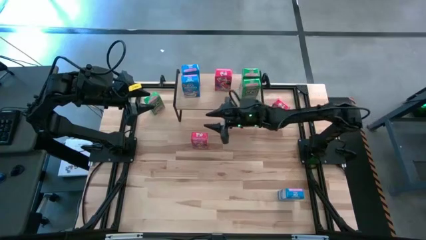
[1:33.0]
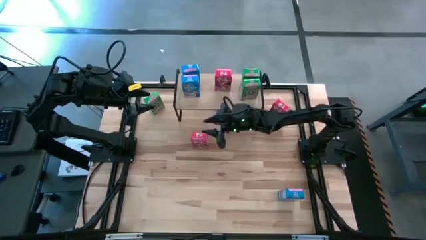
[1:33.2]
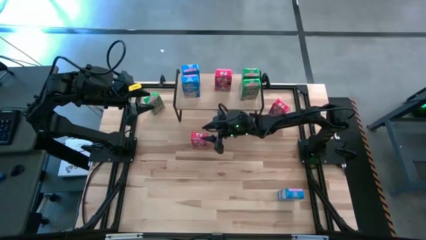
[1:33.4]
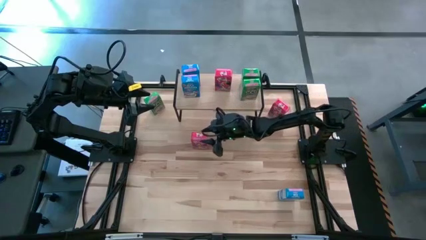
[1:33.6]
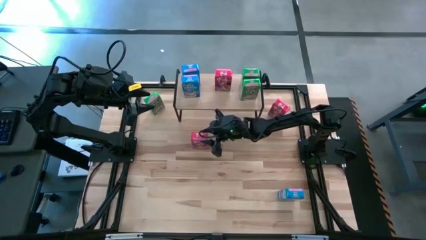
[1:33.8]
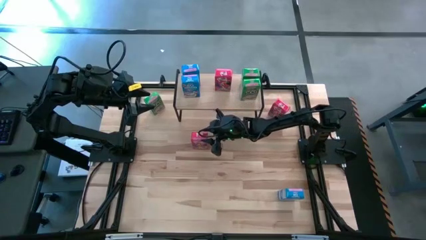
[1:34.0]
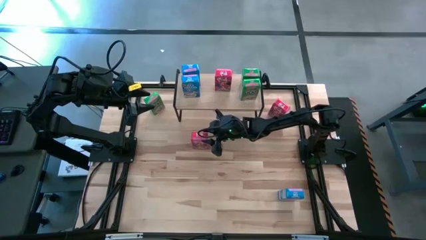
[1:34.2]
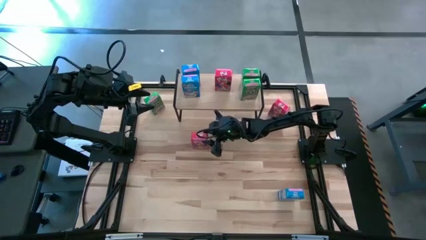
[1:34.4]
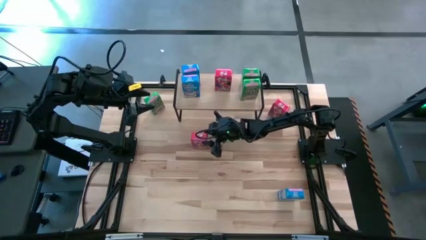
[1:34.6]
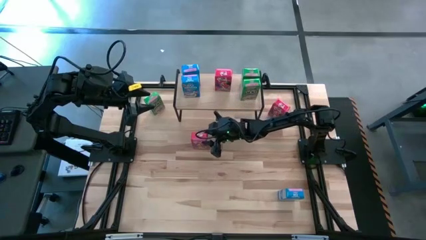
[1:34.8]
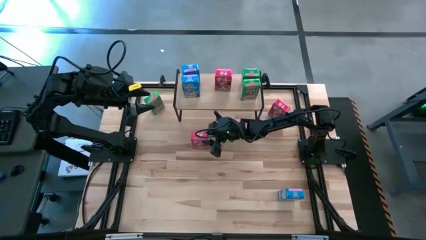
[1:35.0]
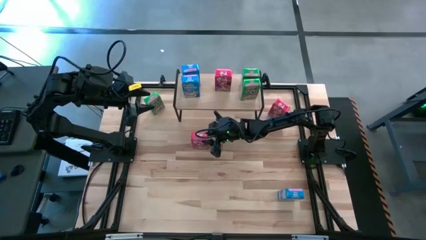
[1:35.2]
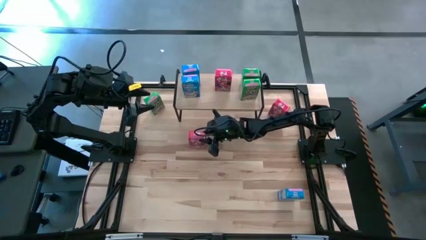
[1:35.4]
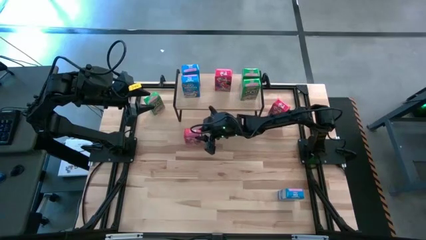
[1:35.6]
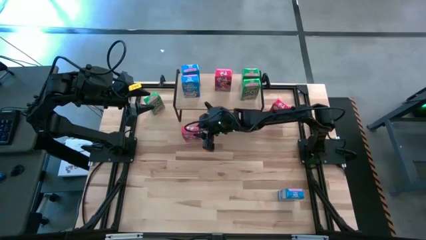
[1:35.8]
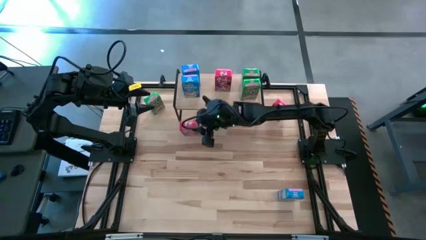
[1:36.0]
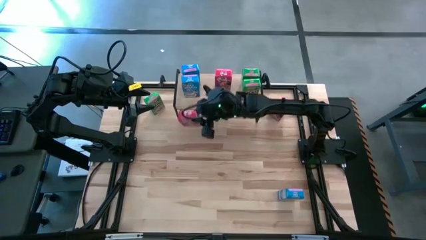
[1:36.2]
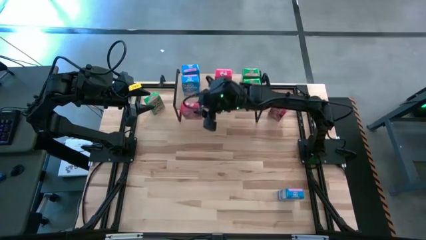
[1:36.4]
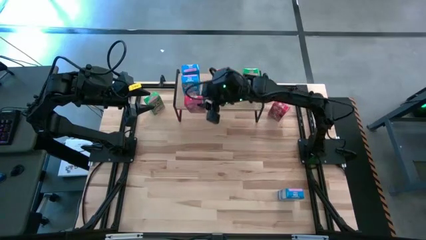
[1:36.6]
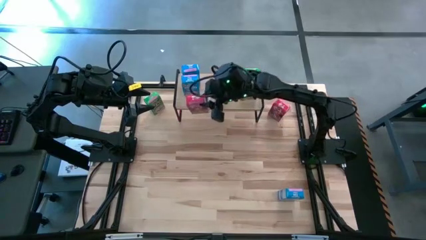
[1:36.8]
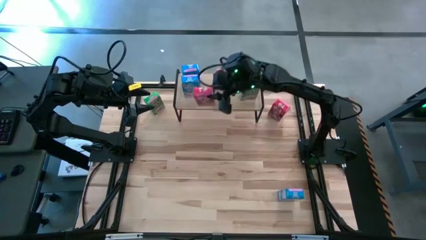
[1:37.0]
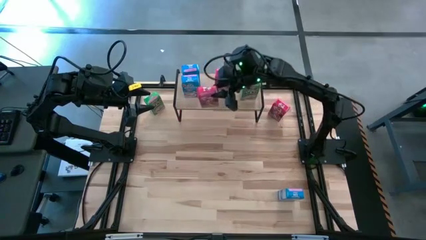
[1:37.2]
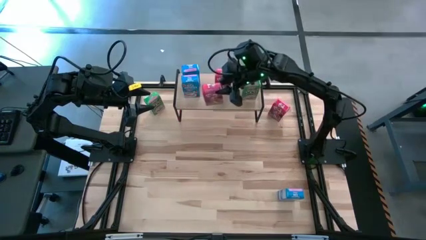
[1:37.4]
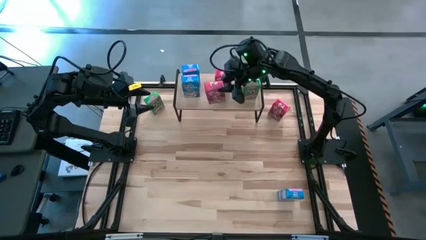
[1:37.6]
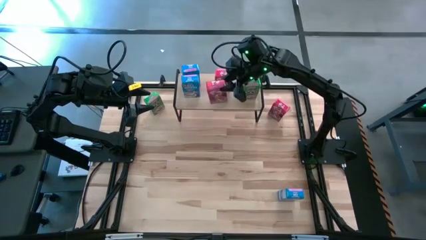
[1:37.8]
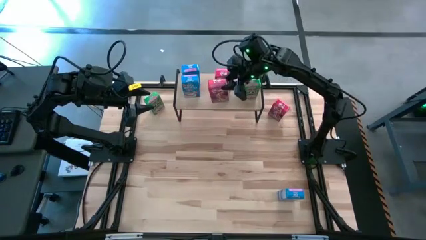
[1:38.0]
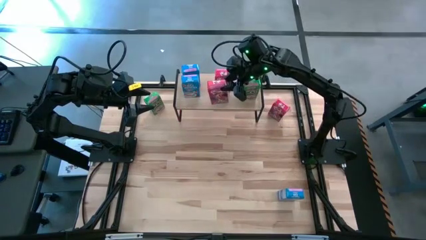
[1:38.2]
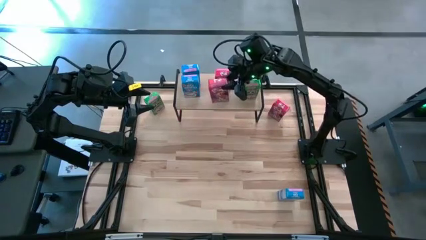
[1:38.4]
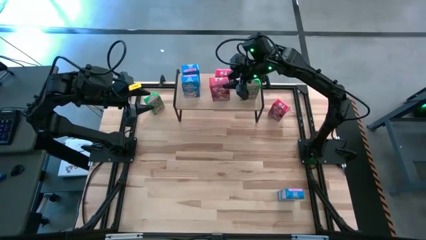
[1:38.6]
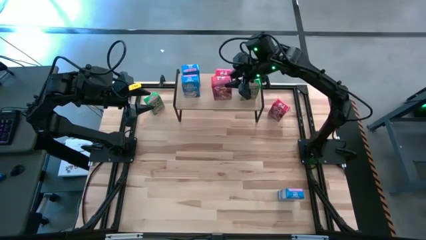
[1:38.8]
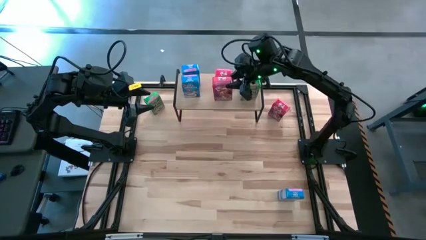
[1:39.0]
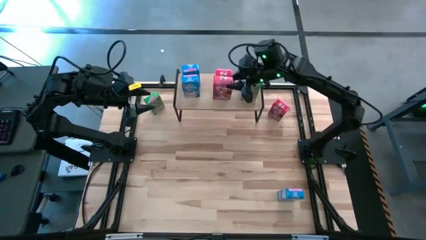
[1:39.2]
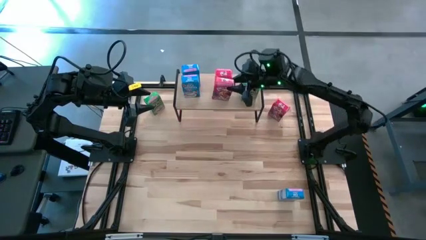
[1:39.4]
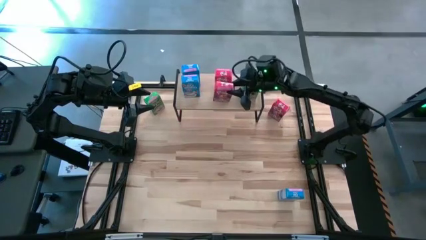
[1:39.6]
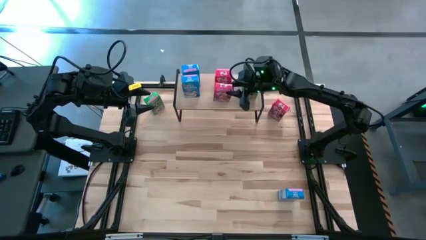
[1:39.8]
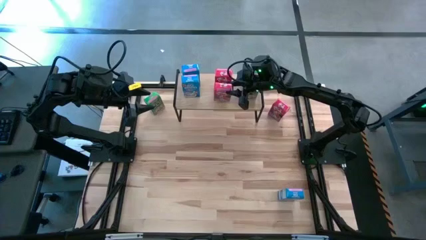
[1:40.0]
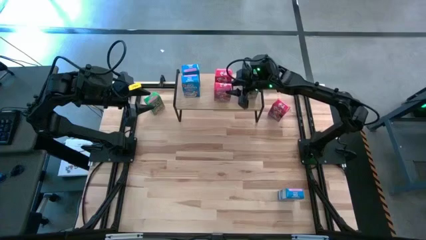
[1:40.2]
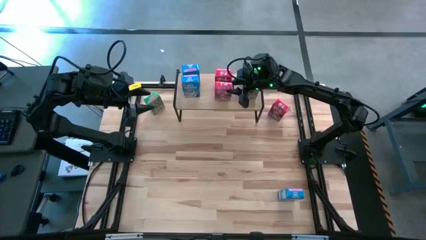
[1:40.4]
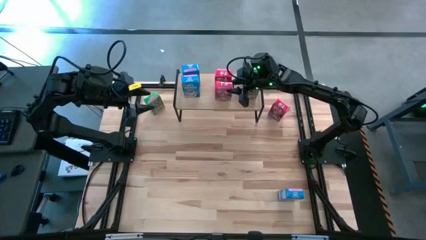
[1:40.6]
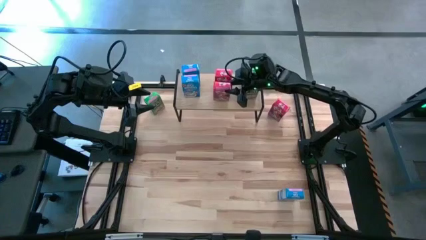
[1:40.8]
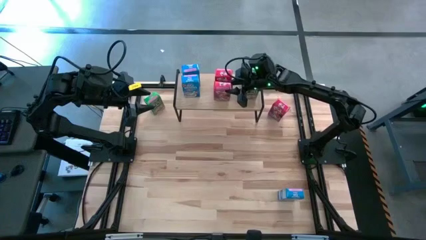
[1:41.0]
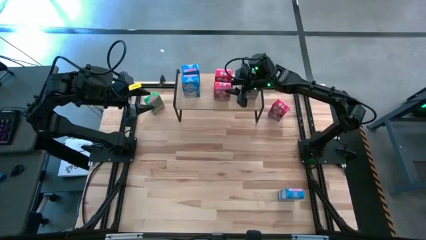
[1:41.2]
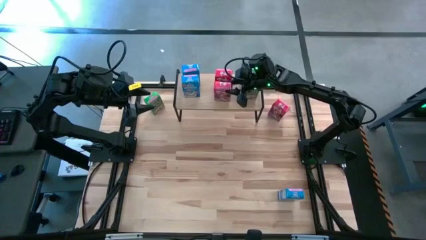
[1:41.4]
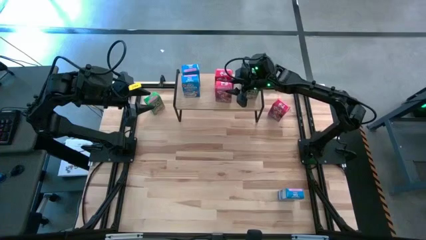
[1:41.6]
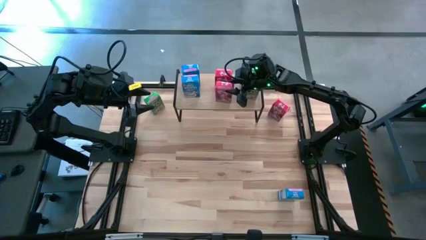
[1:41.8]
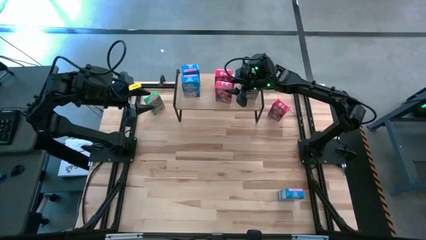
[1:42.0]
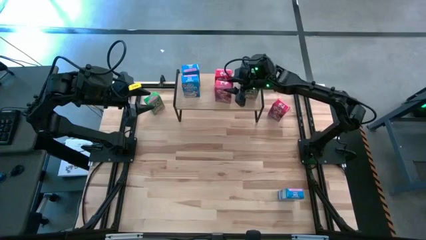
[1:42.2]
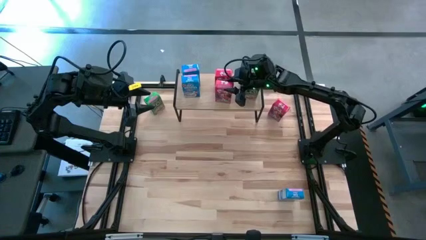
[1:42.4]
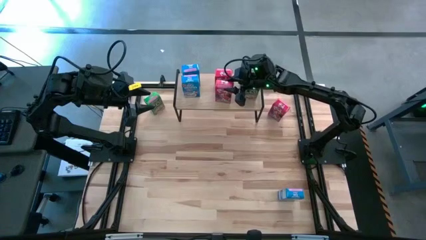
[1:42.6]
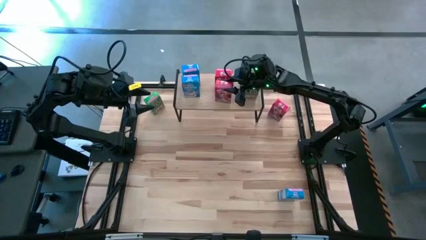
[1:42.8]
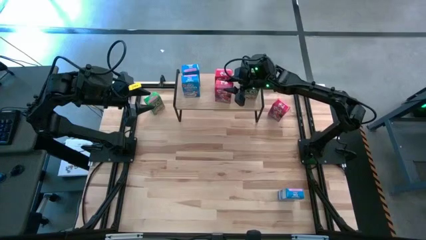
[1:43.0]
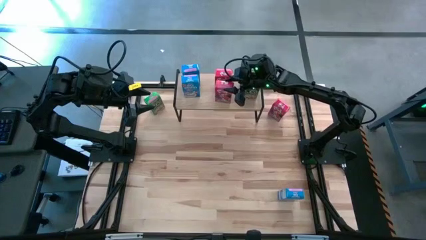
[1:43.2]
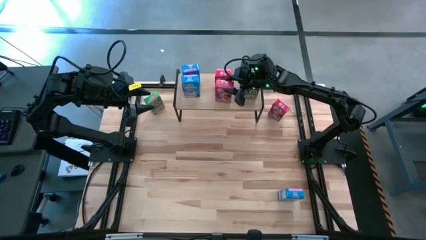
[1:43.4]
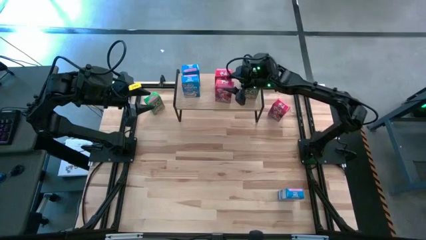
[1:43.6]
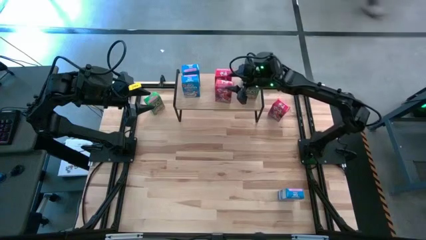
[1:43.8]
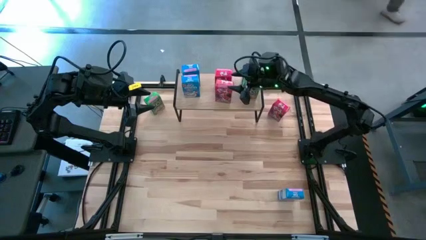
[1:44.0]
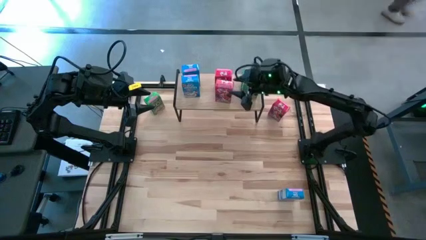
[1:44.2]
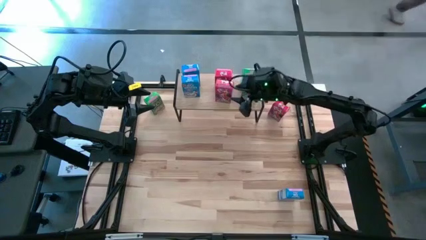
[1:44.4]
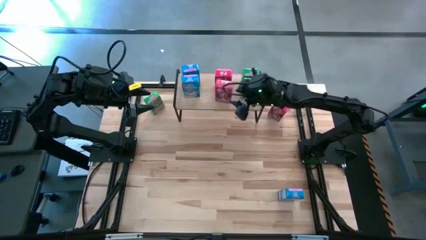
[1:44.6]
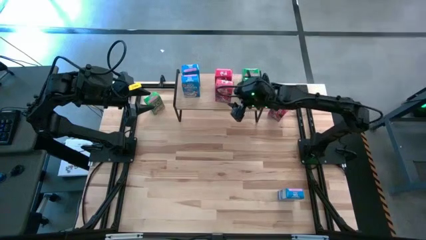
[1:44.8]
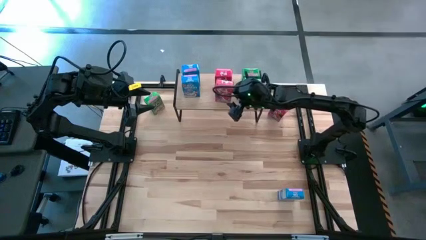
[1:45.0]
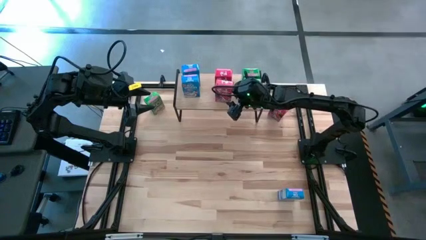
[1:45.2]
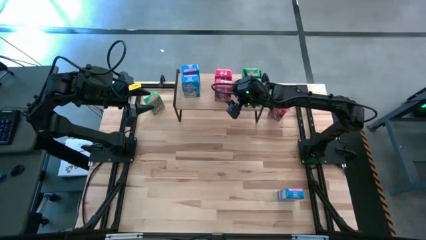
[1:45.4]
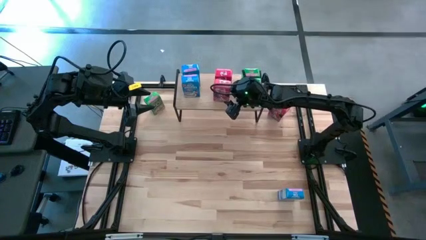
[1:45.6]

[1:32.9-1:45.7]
Task: Stack cereal on shelf
Put the bottom red cereal box on the shelf aligned with the other red cereal box

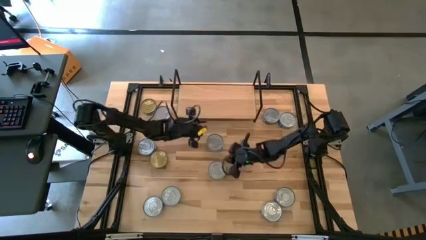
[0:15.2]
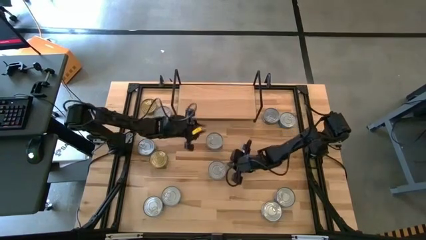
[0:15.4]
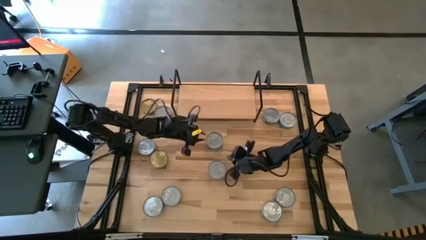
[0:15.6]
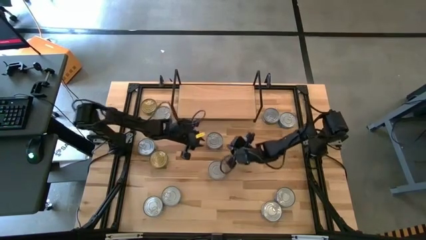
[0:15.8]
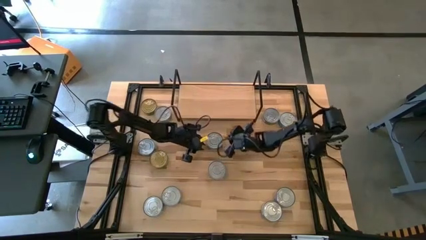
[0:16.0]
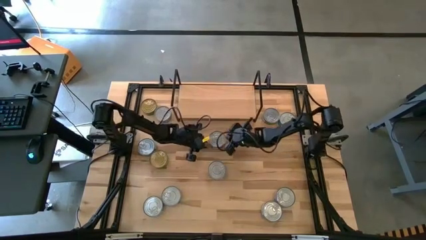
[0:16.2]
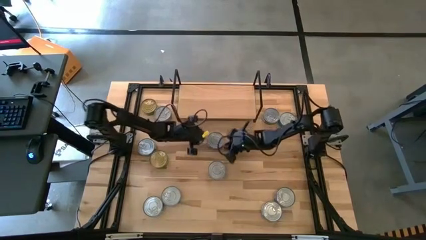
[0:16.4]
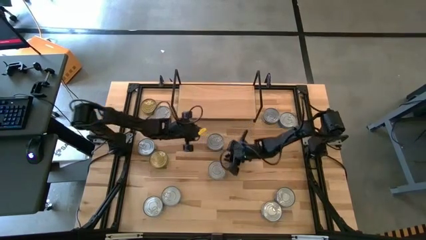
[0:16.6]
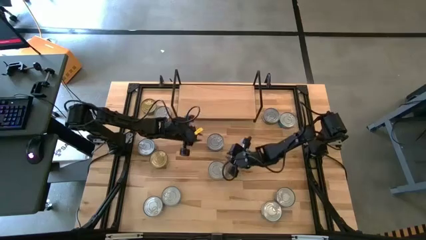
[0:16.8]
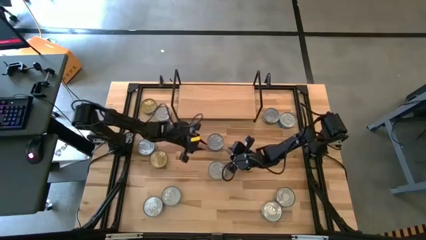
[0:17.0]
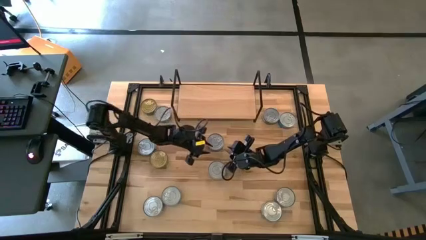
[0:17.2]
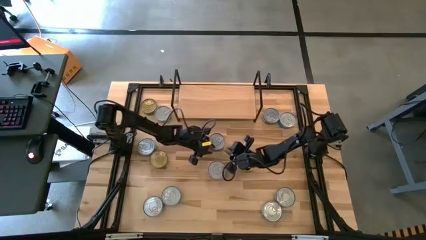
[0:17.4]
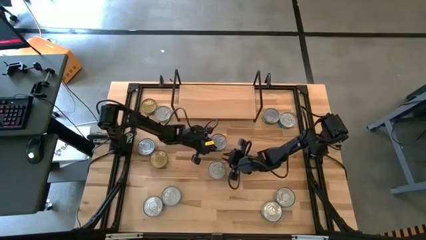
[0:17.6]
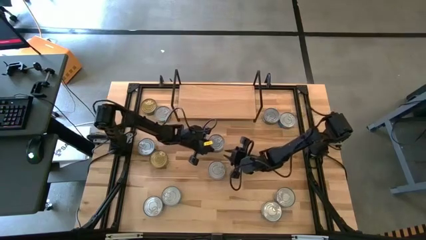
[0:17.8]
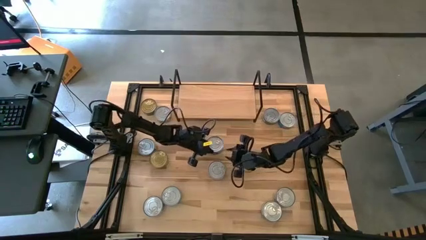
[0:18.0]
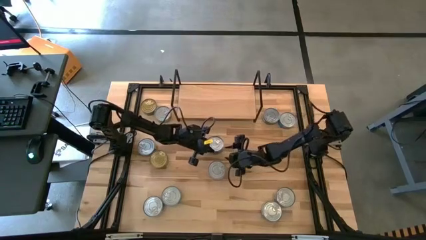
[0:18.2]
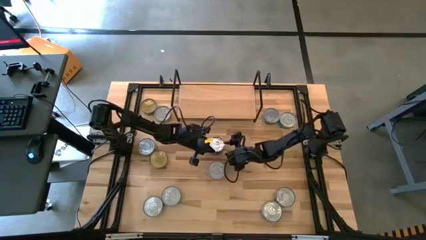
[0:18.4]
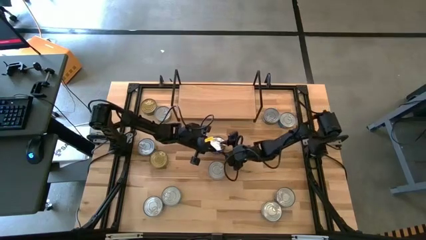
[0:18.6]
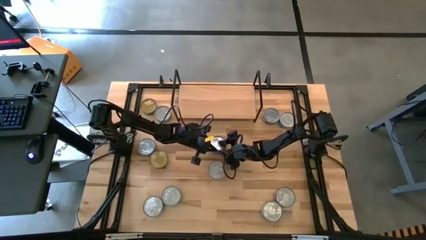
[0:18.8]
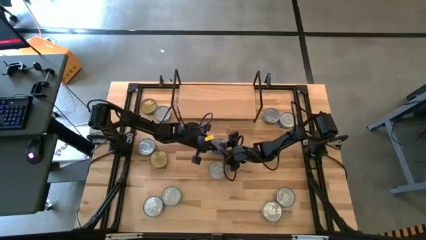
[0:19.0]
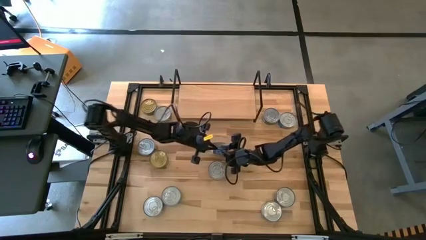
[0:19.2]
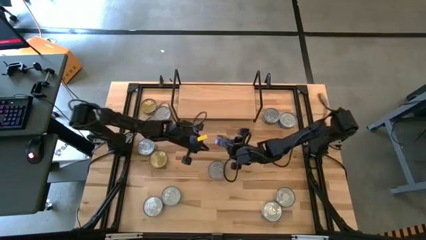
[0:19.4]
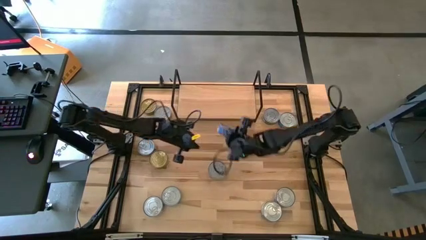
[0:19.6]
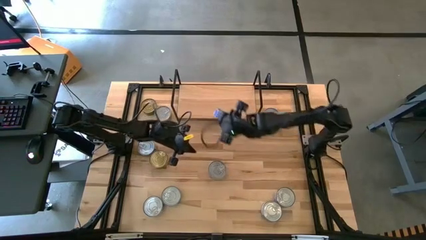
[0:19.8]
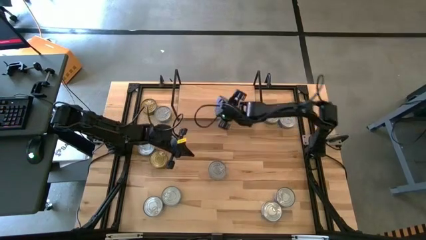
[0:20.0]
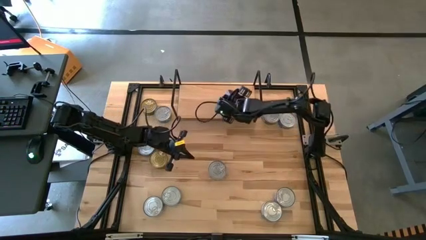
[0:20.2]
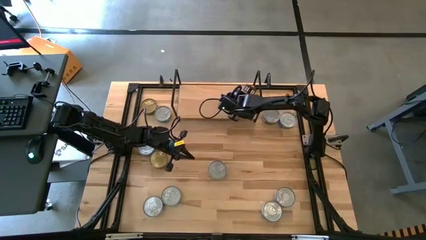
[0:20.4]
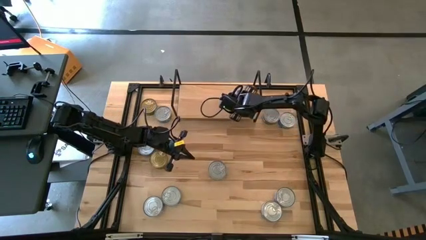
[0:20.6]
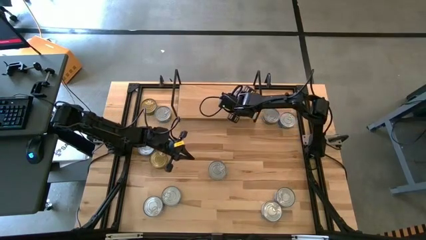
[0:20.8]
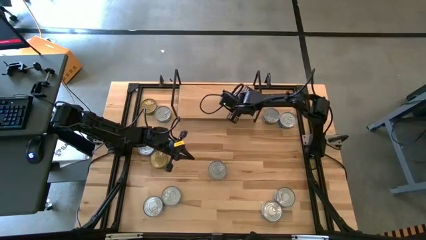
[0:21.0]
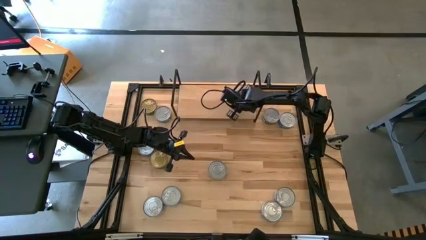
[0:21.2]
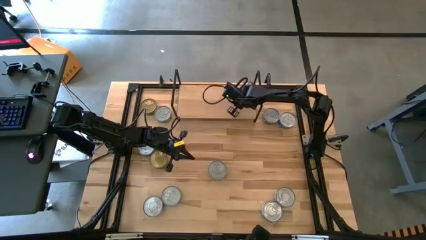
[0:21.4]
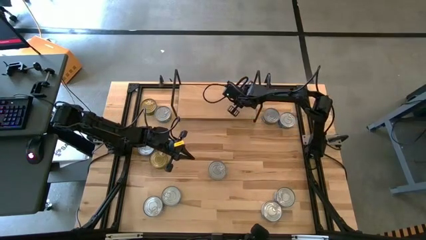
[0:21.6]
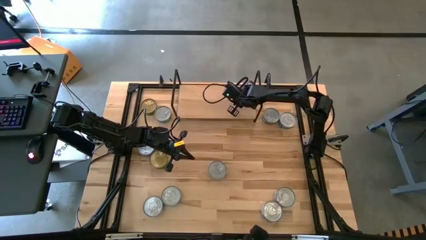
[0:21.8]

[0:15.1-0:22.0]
Task: Stack canned seafood by type on shelf
Put the blue tuna can on the shelf
